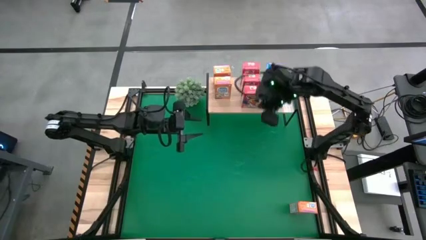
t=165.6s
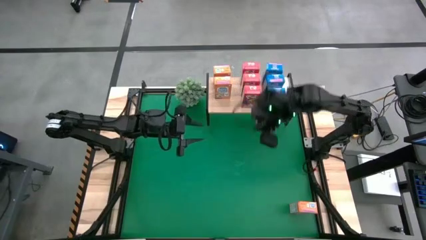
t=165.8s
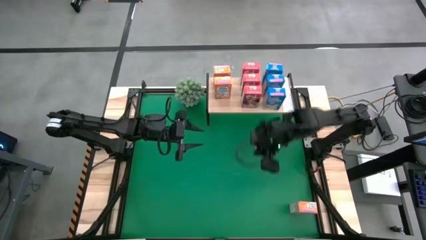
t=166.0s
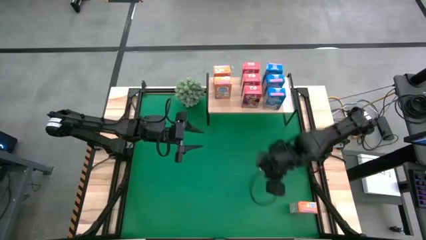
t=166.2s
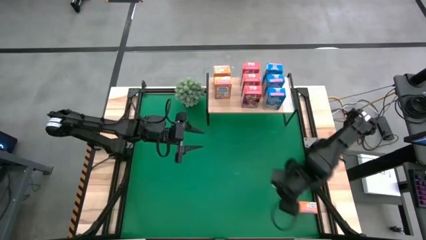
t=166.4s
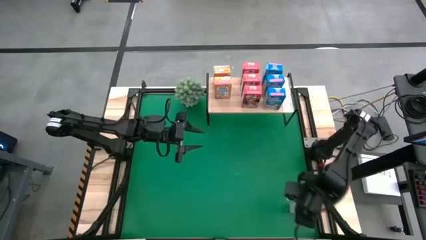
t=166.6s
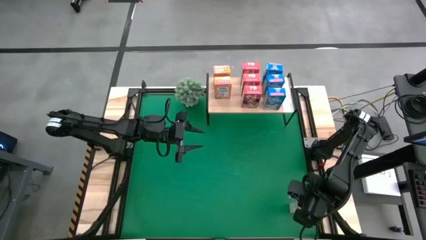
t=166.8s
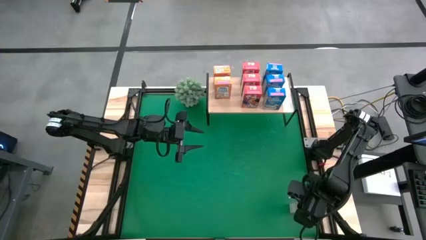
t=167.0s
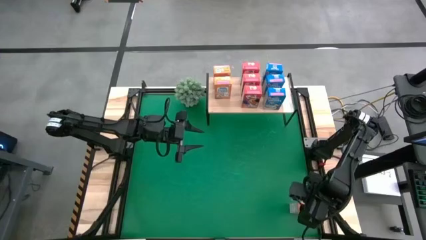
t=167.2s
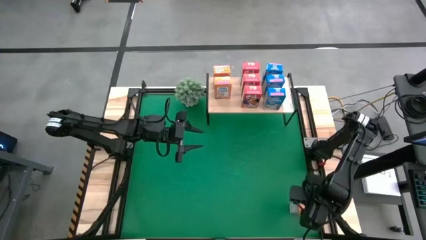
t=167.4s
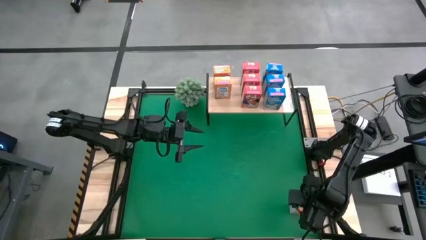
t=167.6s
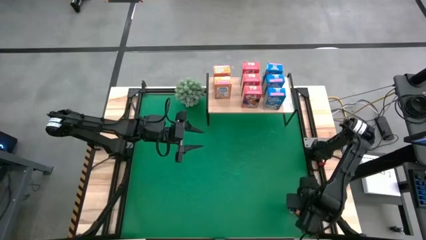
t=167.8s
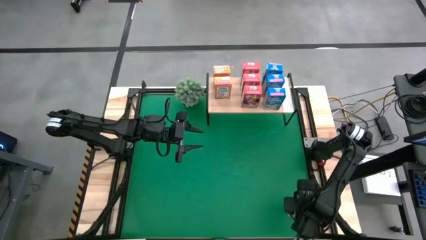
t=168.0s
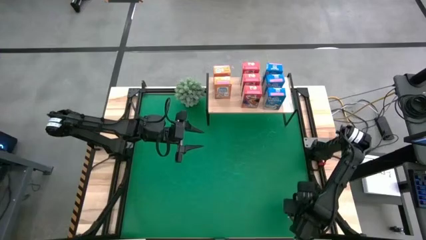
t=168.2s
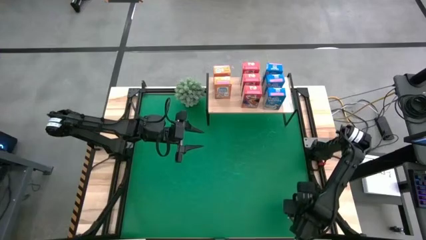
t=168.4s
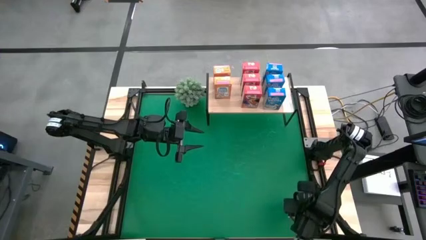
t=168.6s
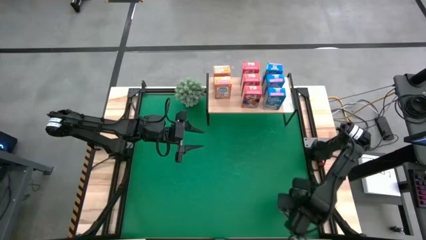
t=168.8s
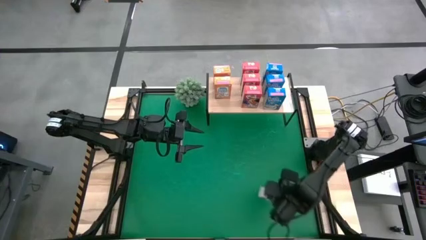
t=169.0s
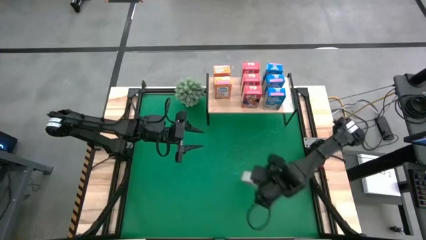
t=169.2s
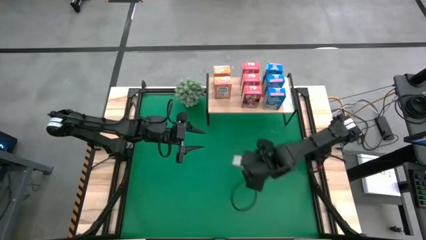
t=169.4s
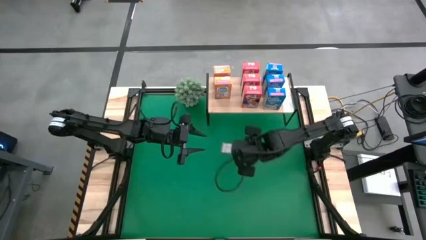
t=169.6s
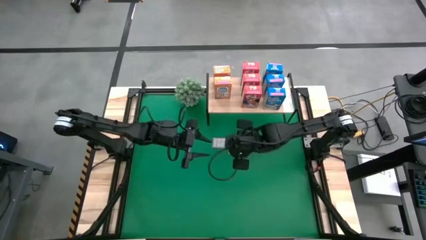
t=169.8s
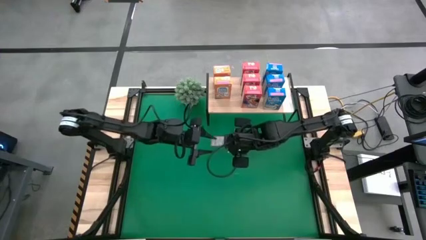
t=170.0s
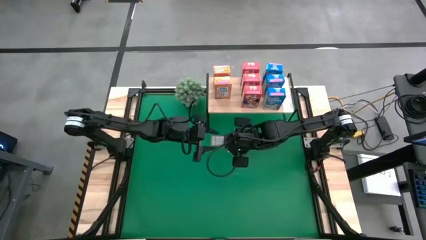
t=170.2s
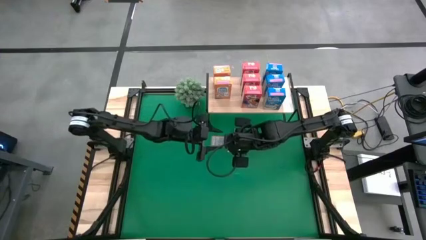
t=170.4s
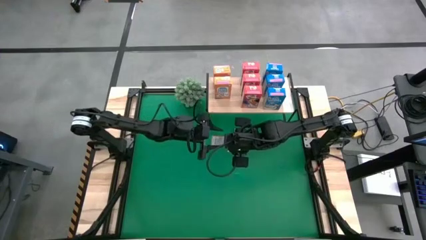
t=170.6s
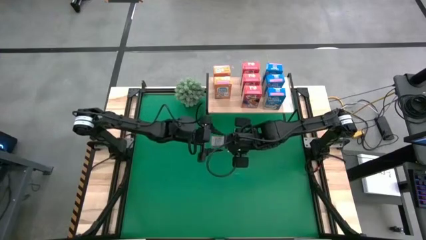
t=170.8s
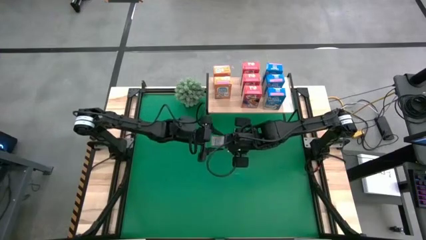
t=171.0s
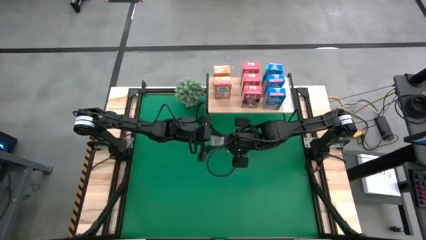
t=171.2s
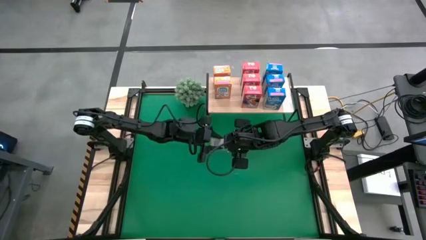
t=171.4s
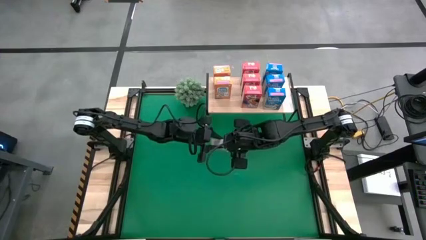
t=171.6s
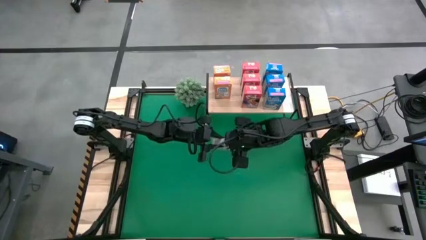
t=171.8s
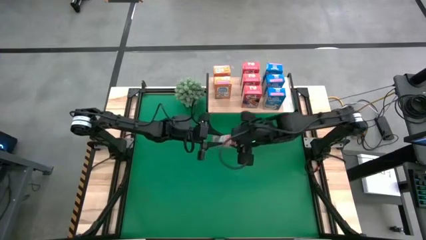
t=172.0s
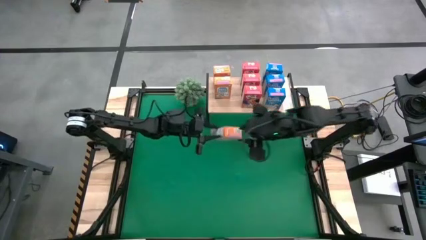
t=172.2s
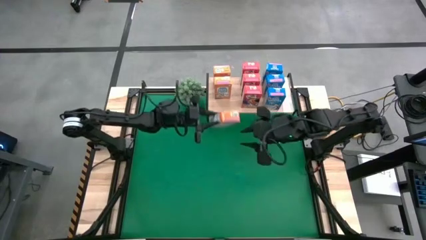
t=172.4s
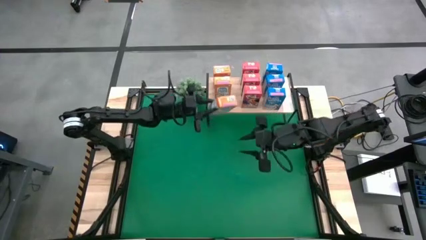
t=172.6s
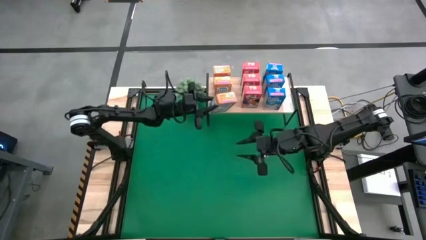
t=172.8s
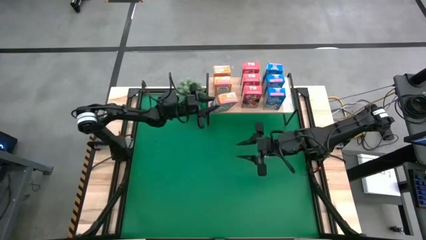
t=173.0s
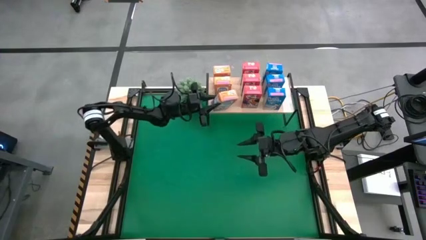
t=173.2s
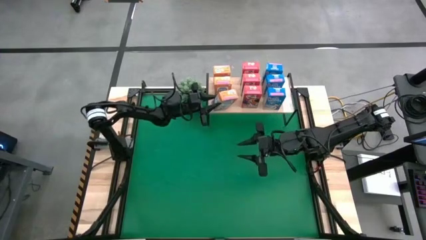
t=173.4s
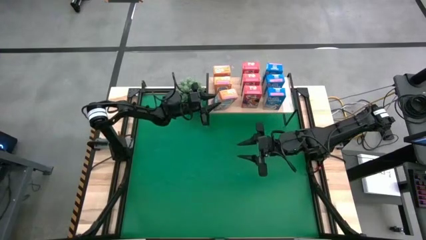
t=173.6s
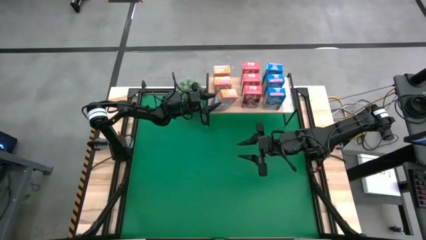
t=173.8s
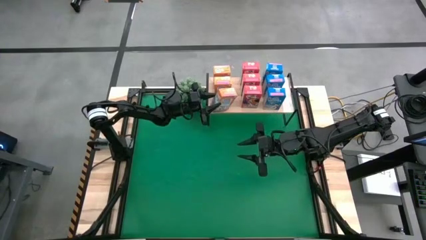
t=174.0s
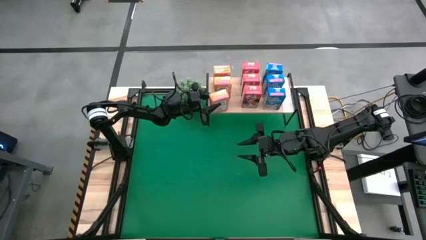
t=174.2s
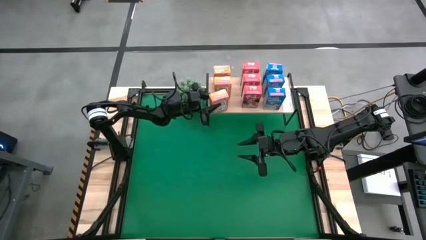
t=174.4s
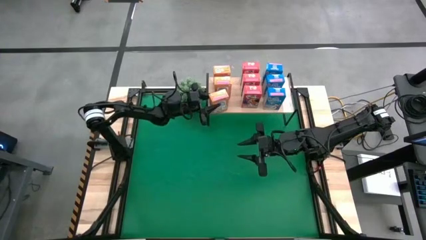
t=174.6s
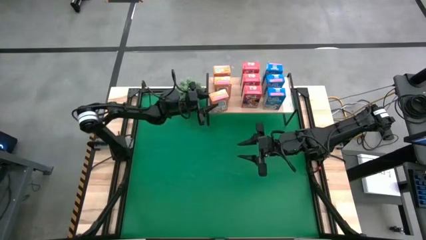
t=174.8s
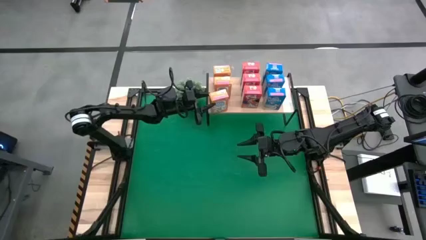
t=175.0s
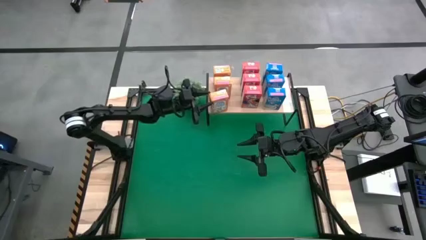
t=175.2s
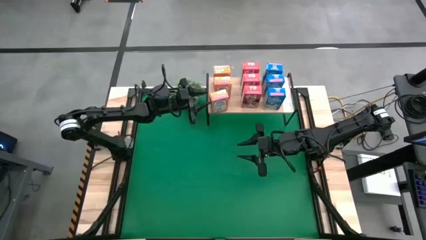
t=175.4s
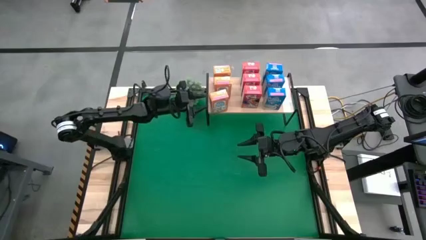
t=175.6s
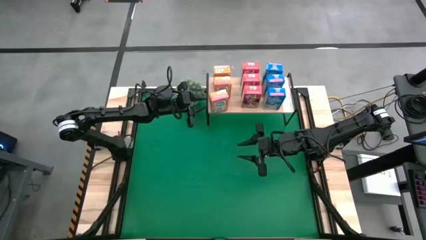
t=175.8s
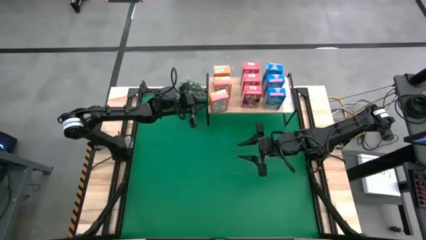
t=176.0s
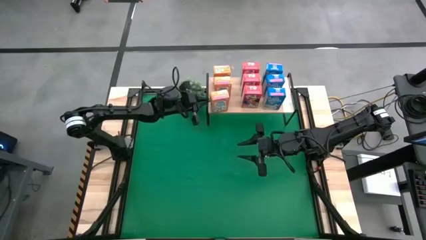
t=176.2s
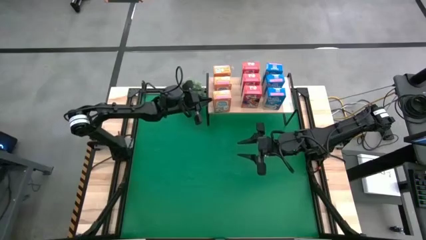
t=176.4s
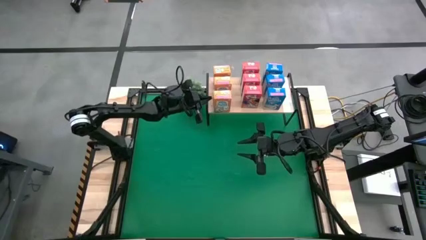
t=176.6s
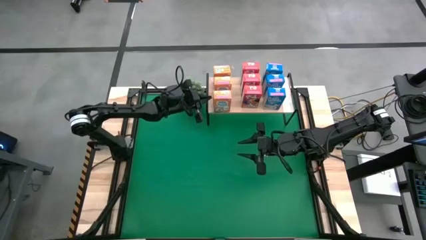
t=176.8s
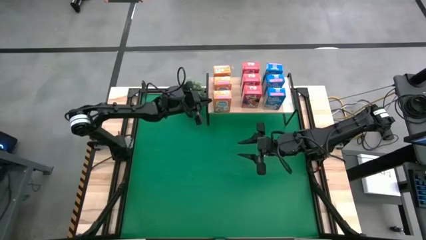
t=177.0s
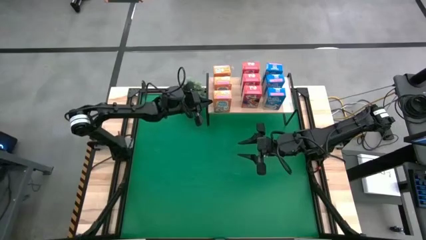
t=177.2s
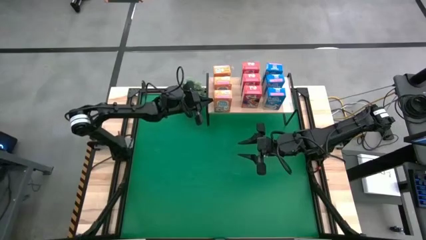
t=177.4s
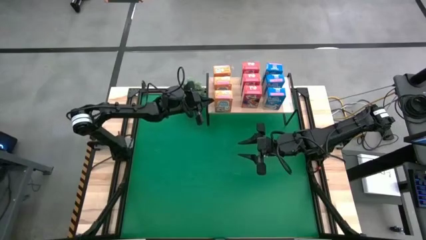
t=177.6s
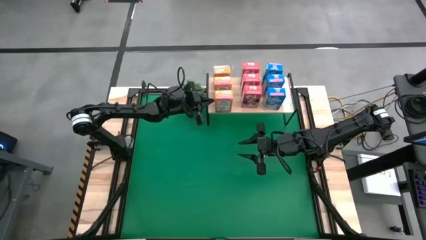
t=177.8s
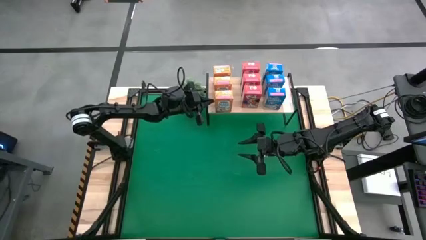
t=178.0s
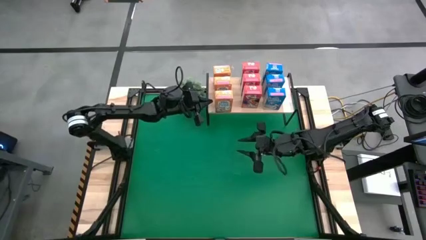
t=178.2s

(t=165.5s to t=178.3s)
Task: Stack cereal on shelf
Put the orange cereal box on the shelf aligned with the other orange cereal box

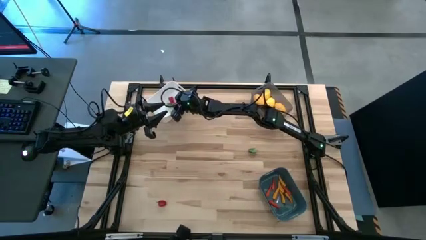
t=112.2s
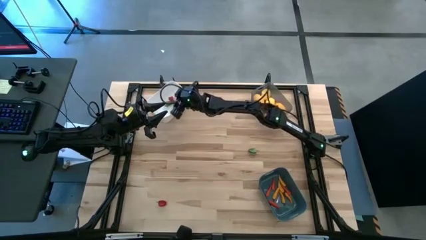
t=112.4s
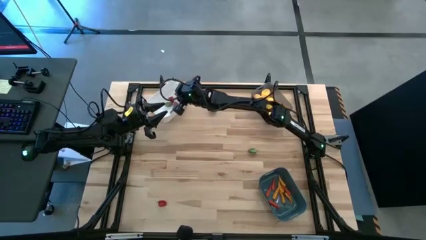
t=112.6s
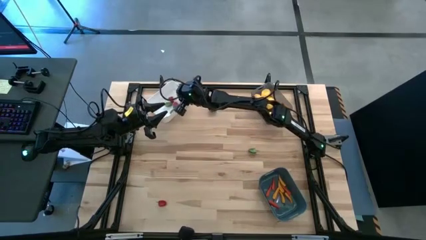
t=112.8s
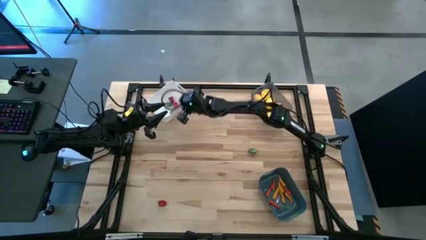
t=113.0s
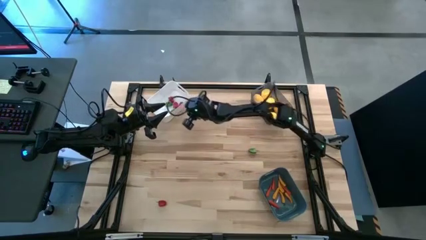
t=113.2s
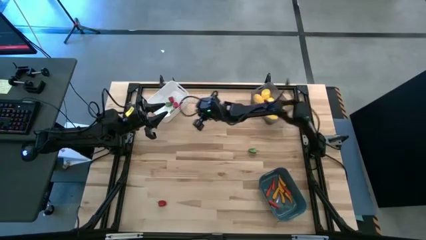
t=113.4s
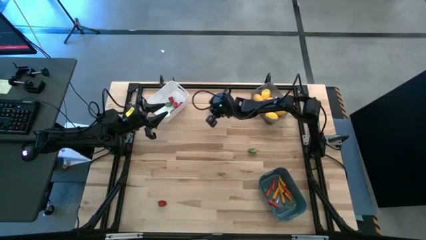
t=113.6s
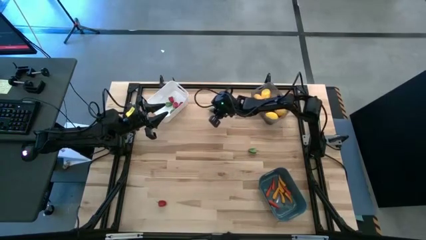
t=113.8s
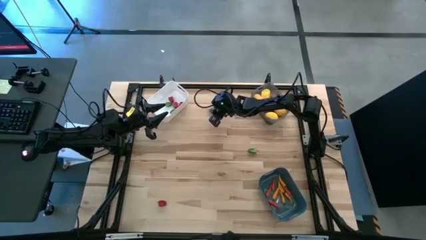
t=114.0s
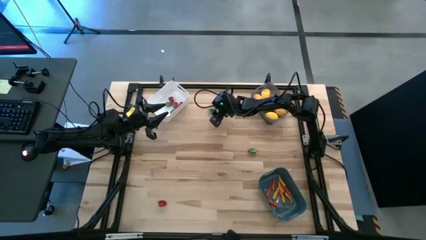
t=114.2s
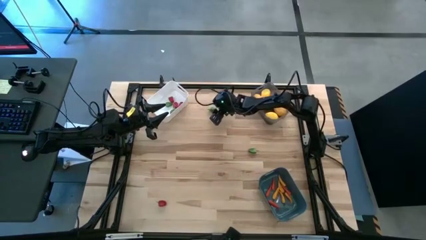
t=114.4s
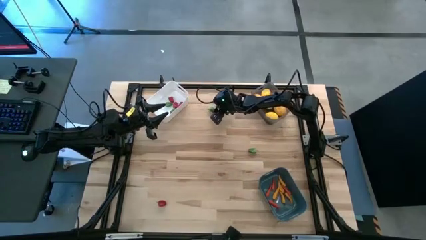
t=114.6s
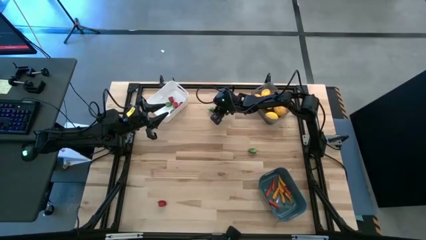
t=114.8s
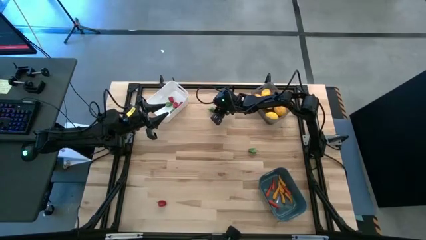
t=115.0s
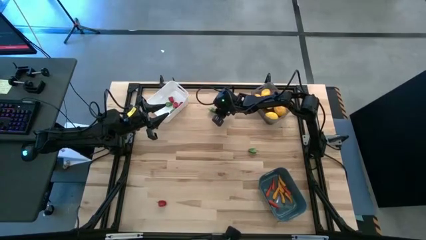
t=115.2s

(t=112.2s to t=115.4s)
Task: Sort produce into baskets
Put the green chili pepper into the white bin

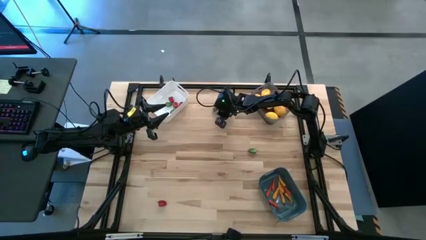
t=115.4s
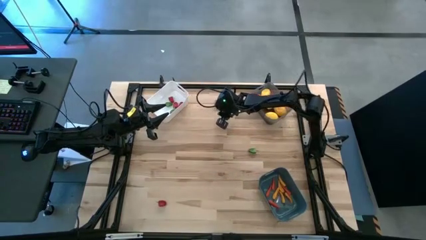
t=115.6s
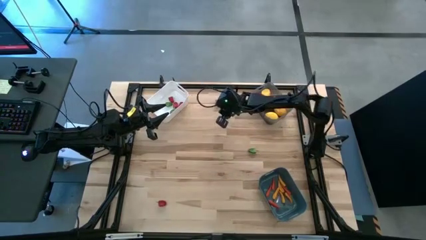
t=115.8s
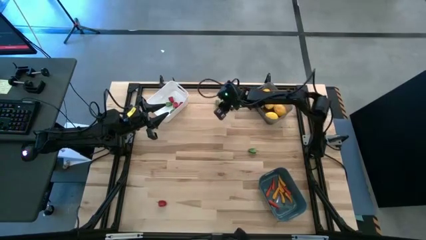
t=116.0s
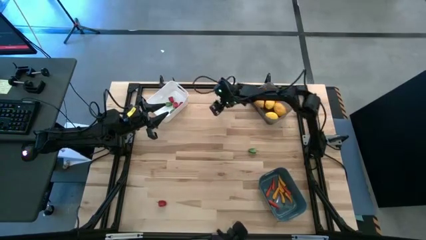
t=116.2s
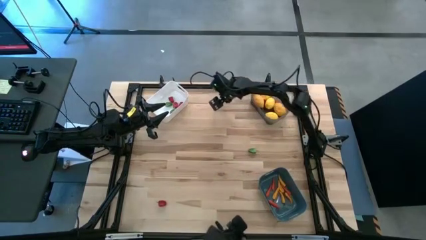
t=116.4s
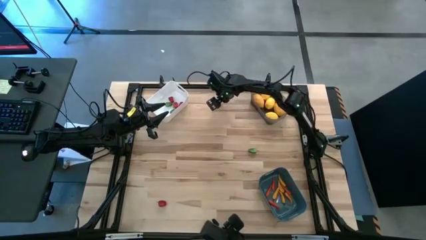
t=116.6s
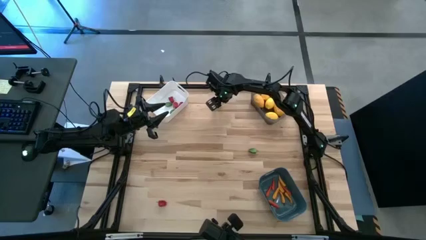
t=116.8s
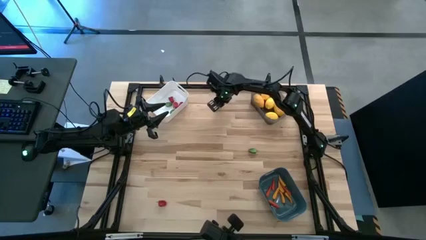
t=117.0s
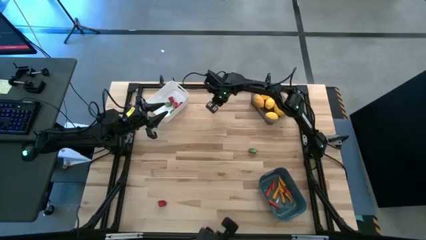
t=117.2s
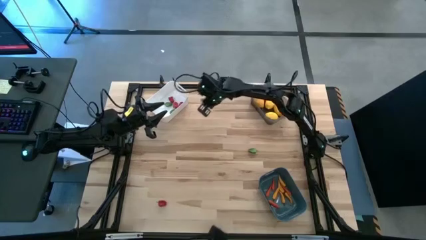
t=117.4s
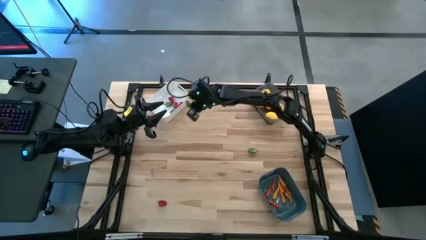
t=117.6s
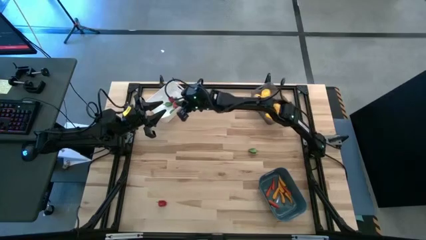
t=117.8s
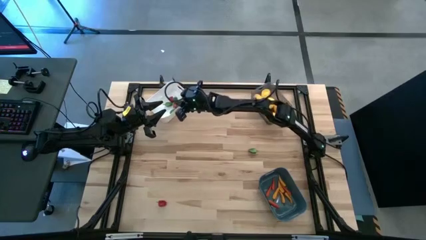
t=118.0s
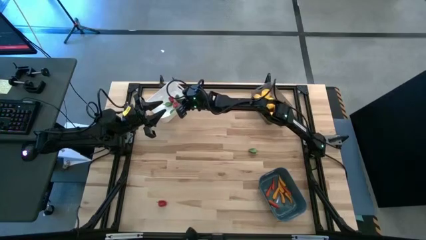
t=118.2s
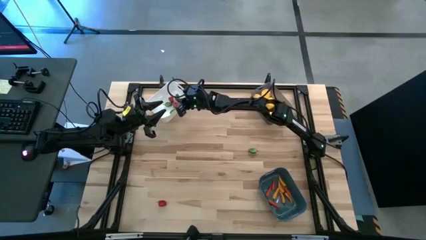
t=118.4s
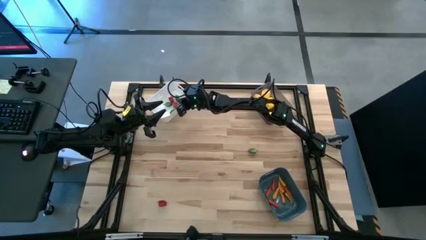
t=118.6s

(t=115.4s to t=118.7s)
Put the green chili pepper into the white bin
